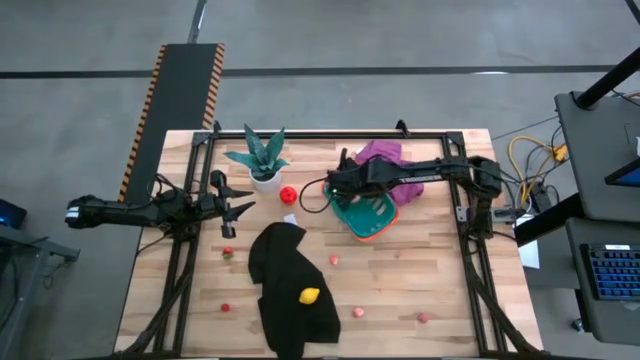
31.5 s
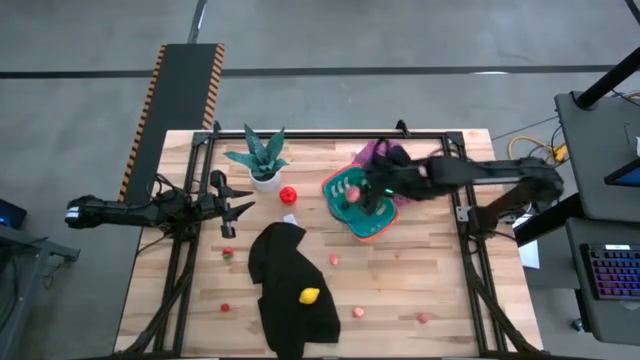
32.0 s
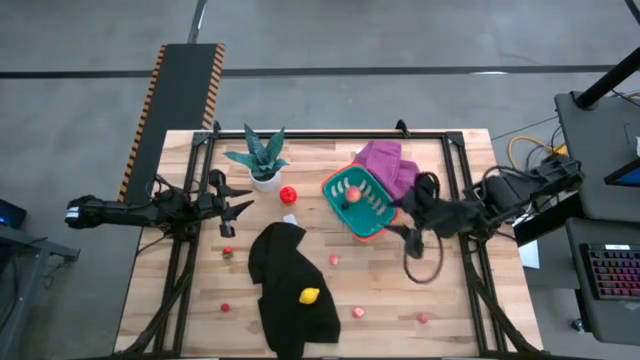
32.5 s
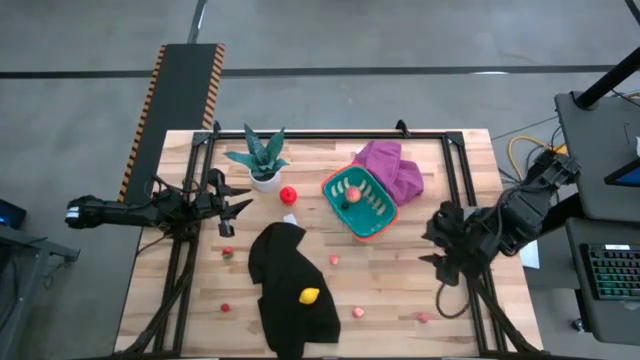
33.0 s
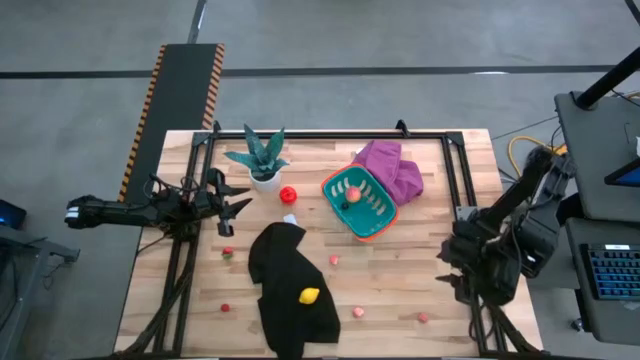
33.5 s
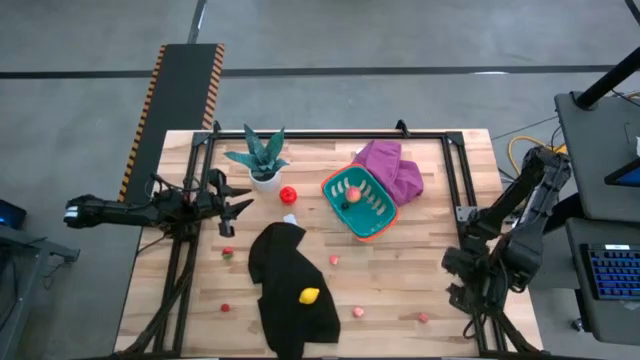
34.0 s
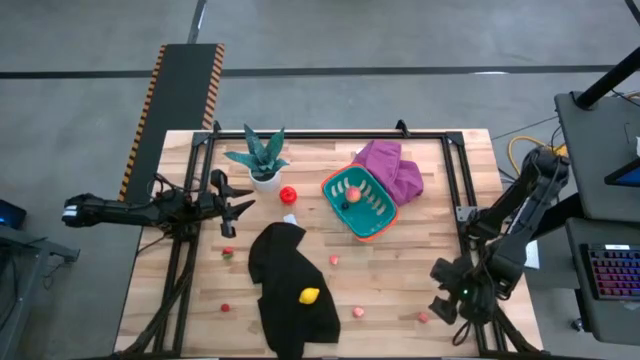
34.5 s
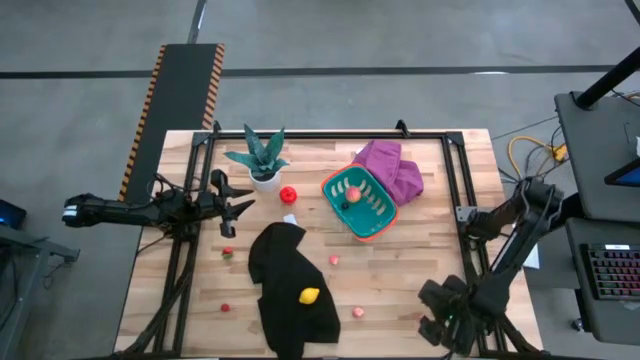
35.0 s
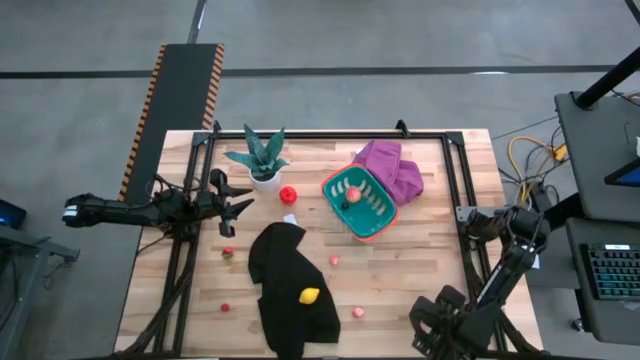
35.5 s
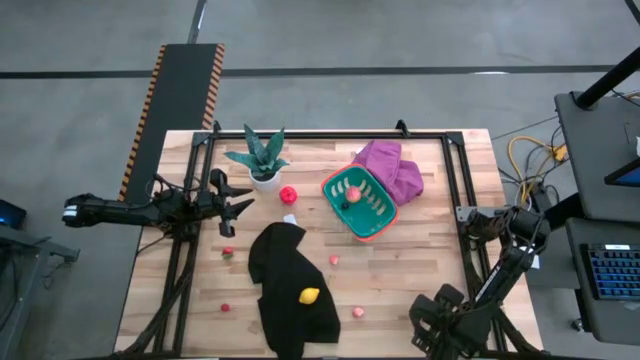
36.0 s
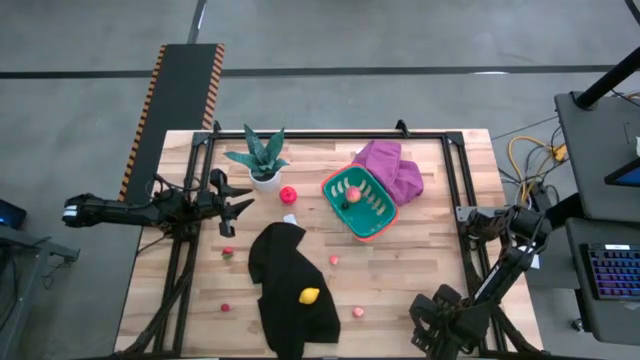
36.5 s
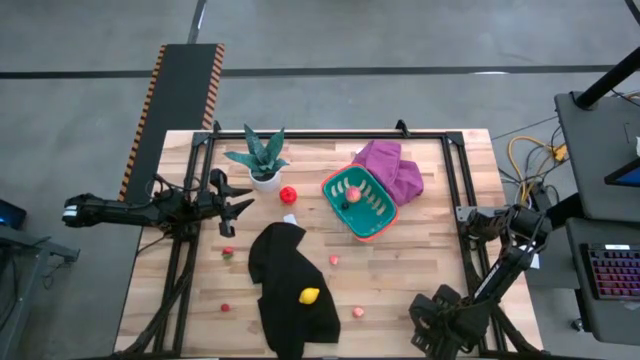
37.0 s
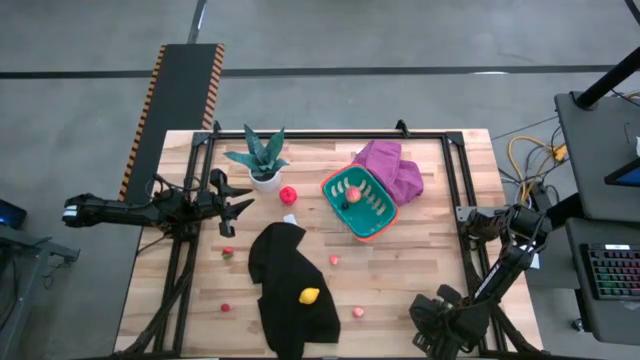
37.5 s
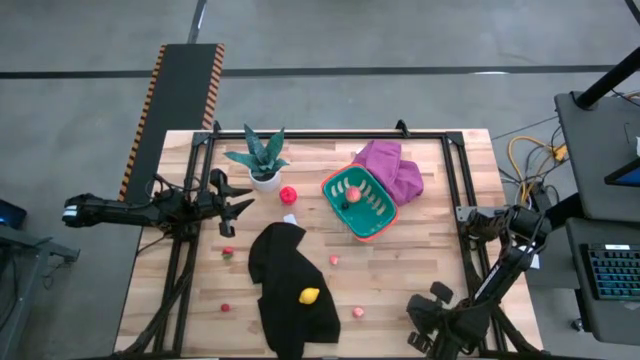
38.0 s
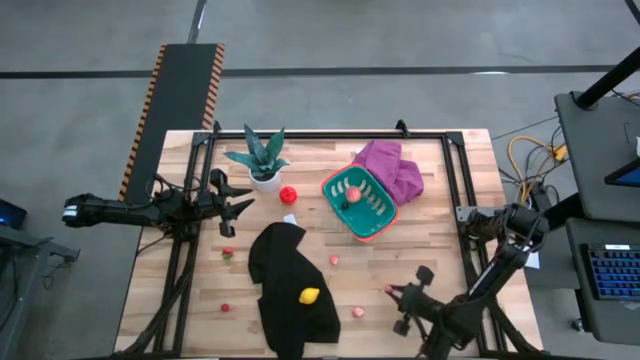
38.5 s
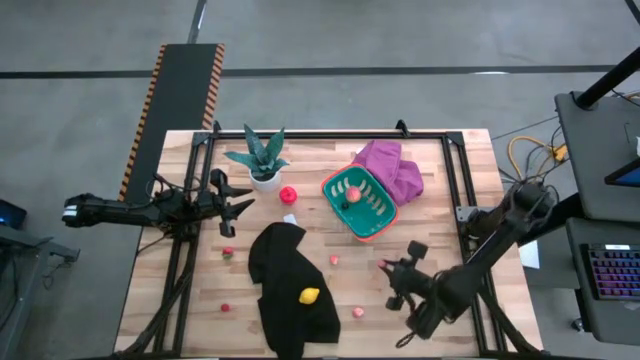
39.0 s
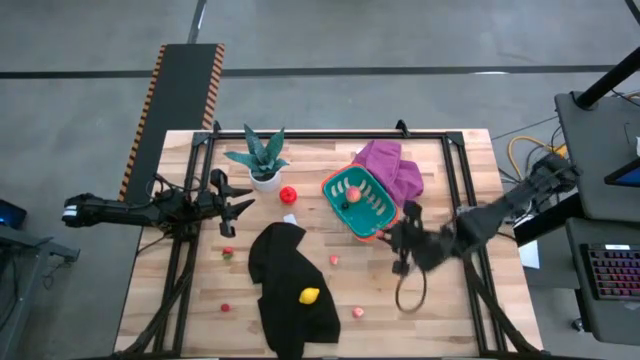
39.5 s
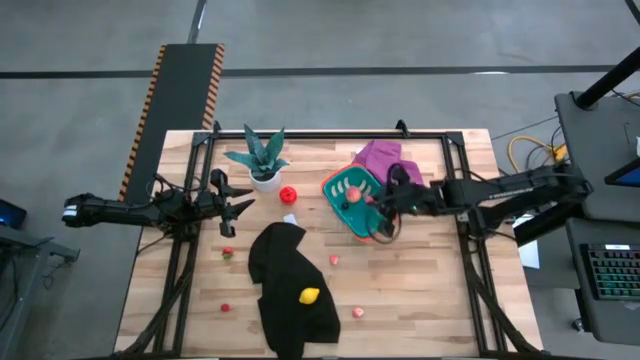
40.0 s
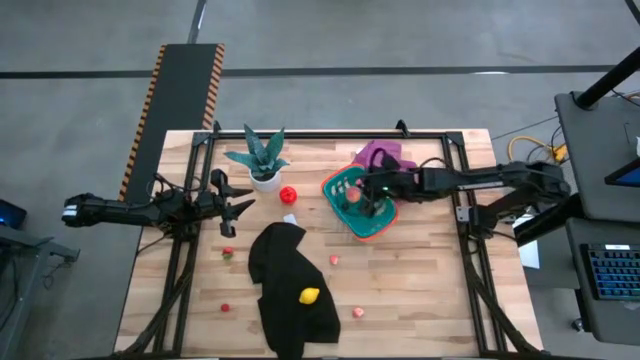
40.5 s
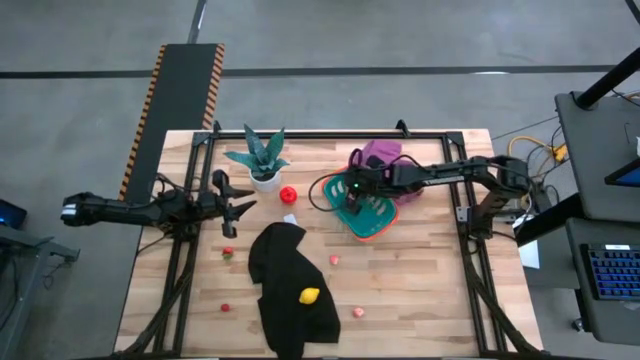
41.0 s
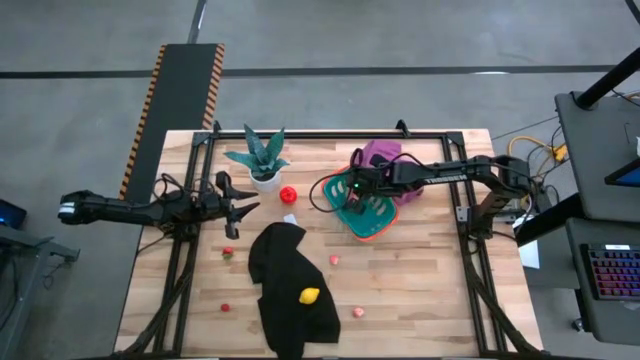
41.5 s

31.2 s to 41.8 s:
Task: Pick and placing Produce into tupperware
Put the bottom right apricot into the green basket

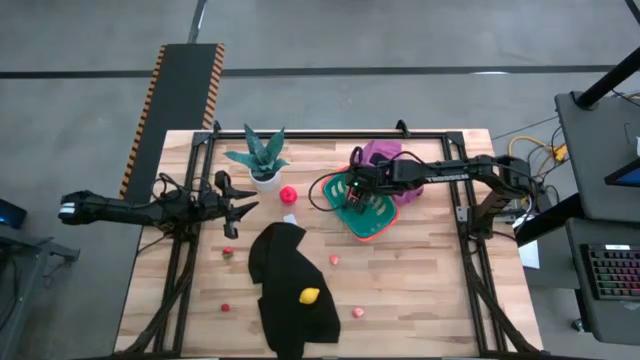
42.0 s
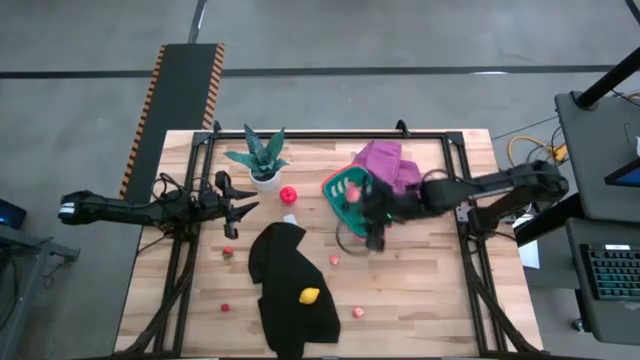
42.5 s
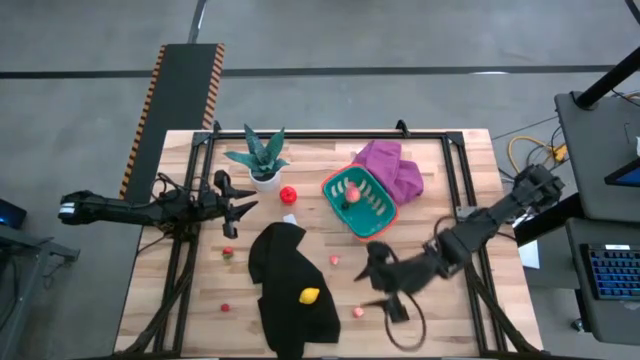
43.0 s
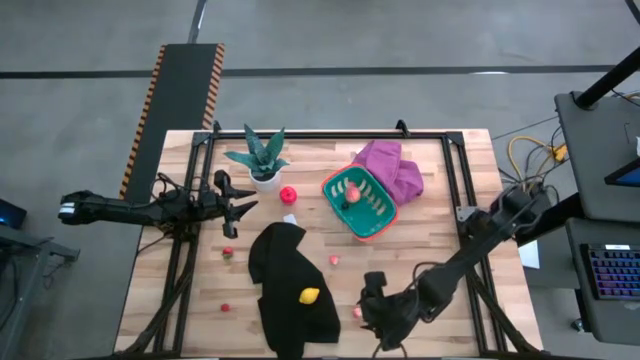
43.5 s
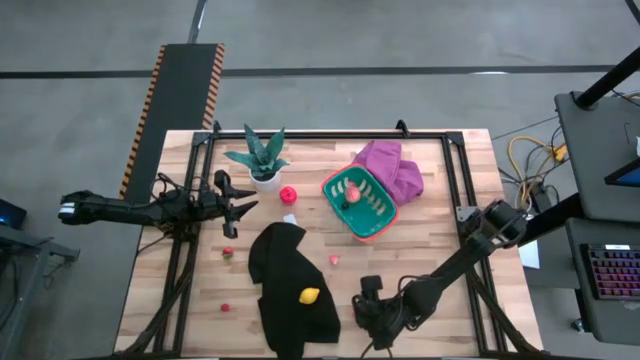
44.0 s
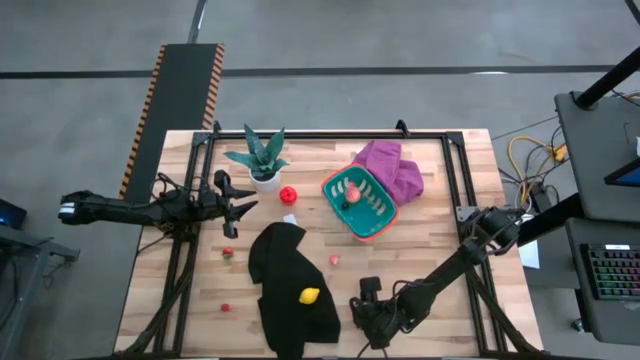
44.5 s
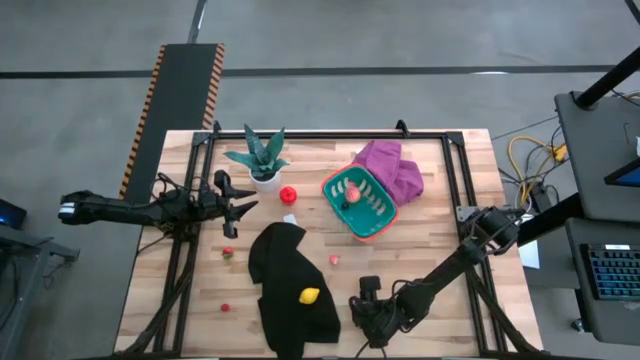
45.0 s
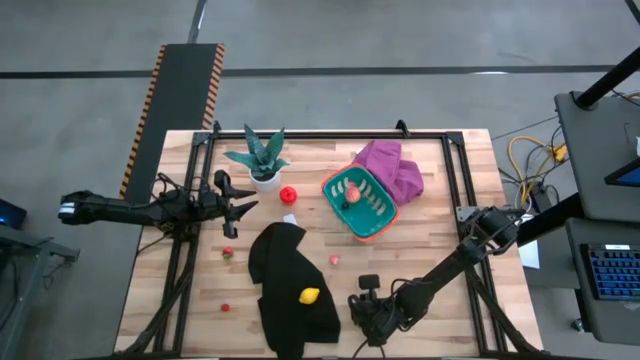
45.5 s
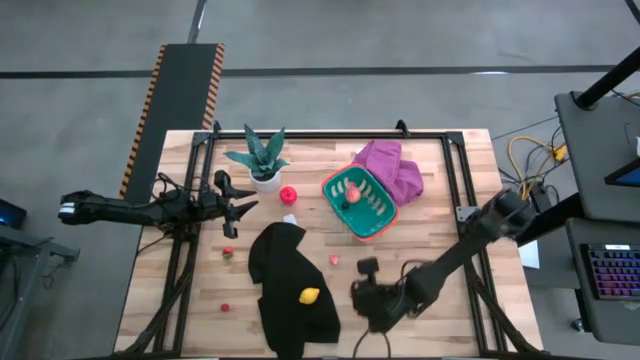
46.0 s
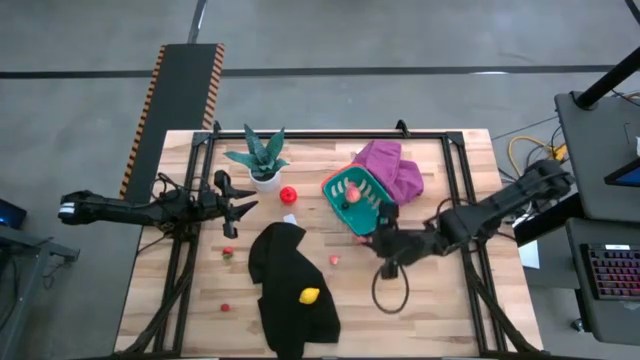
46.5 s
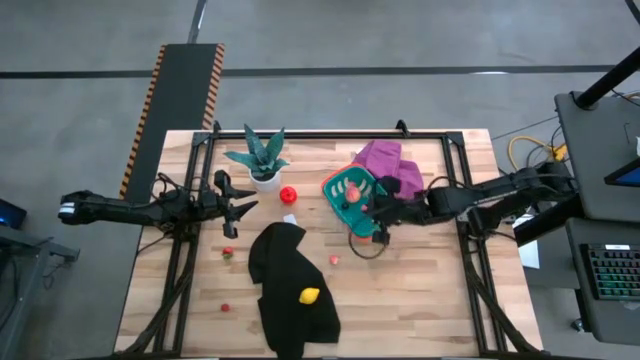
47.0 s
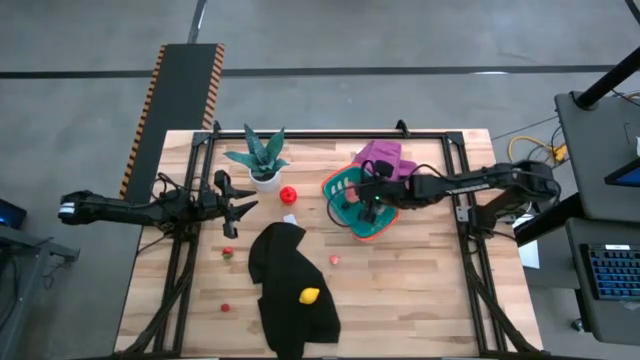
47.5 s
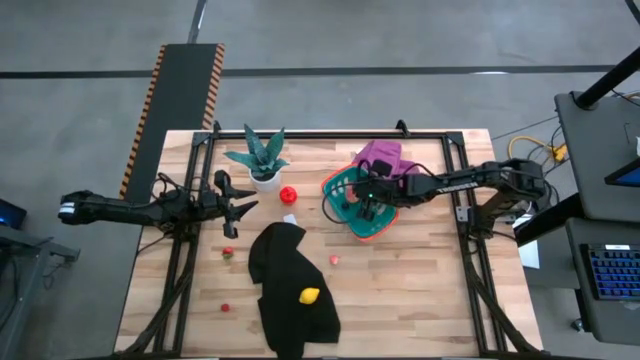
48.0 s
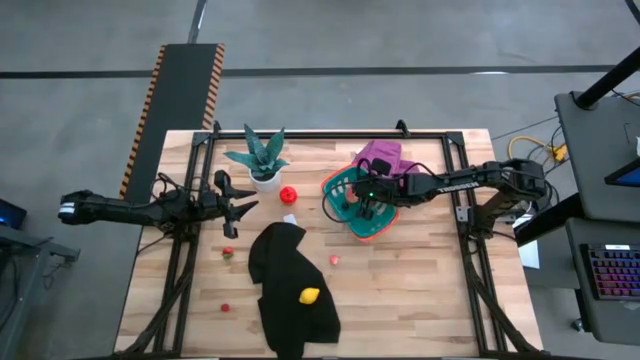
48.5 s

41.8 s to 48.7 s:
Put the bottom apricot into the green basket

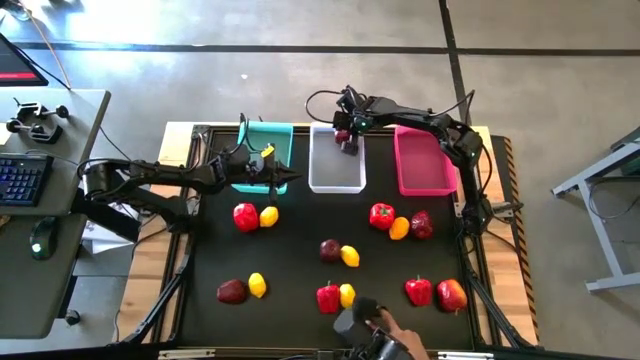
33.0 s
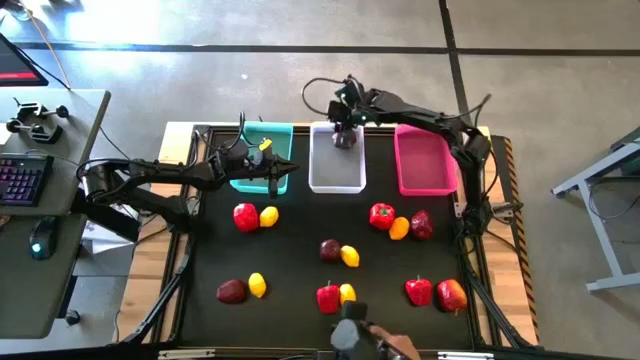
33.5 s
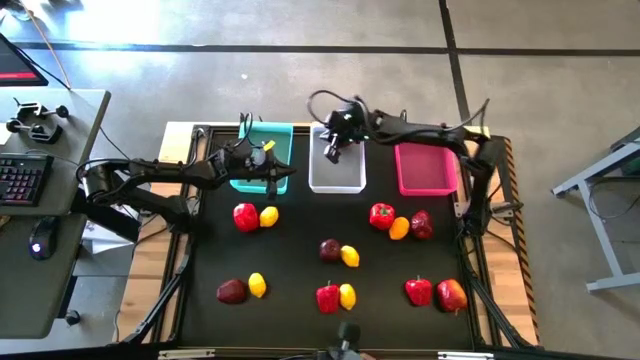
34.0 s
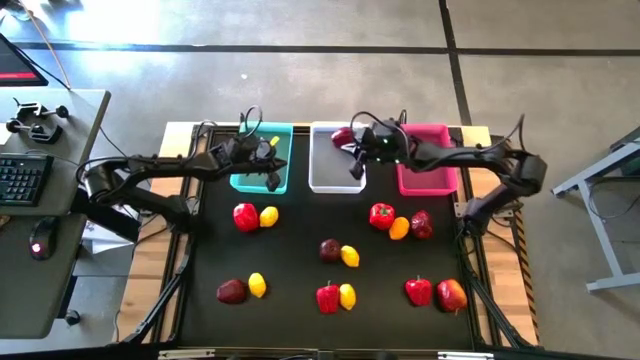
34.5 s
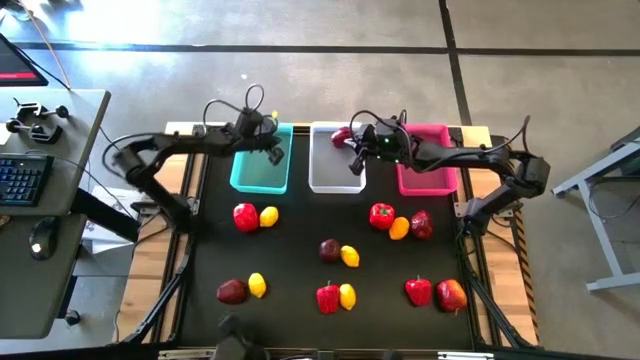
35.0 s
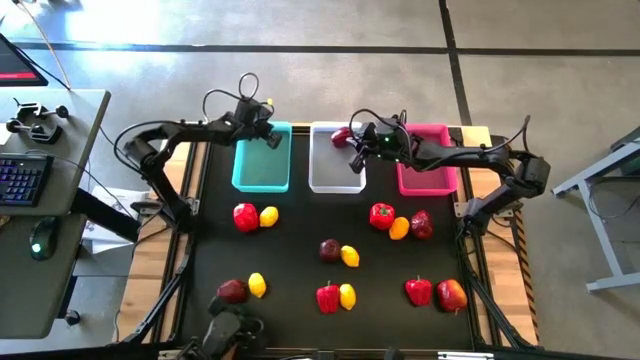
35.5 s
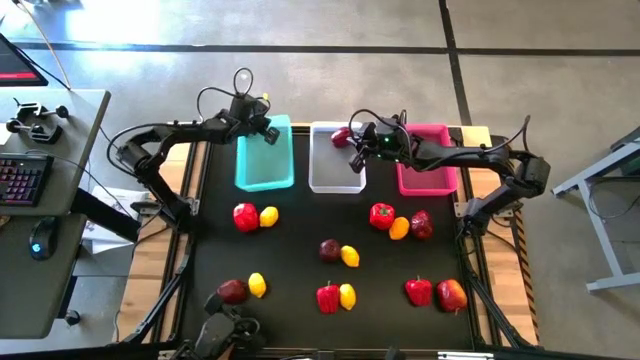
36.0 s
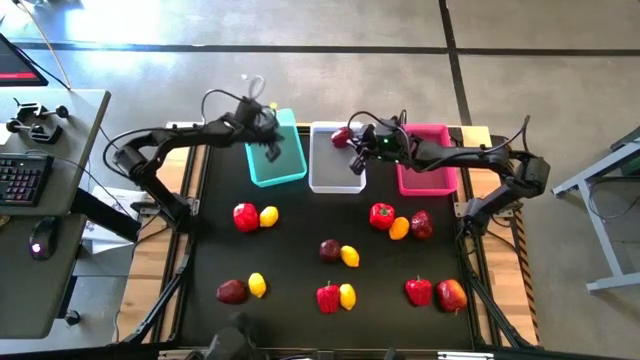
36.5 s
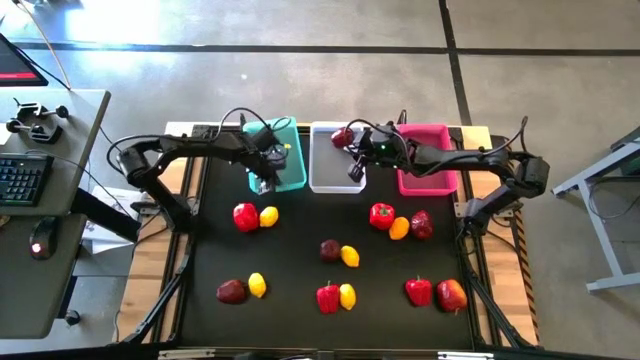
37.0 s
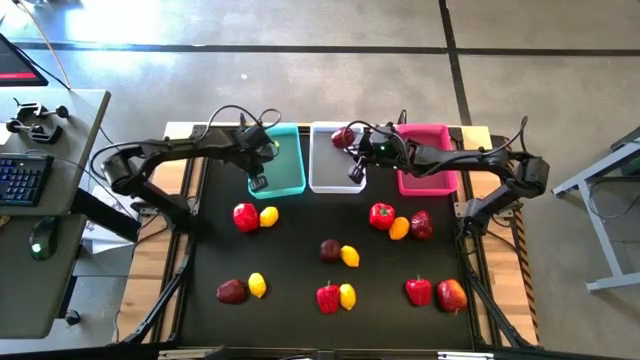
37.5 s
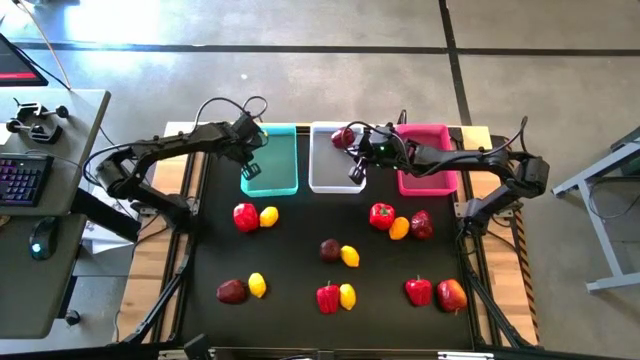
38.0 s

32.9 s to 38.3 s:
Task: Sort produce into baskets
Adjust the green bin
